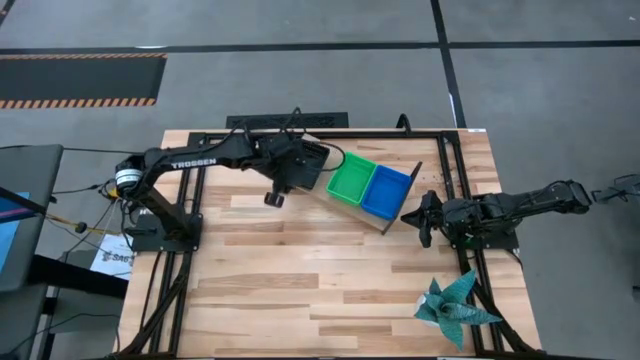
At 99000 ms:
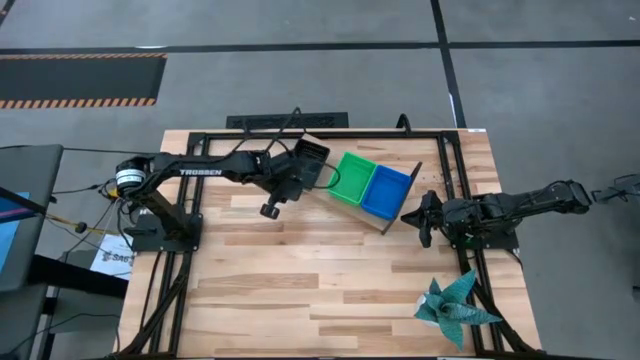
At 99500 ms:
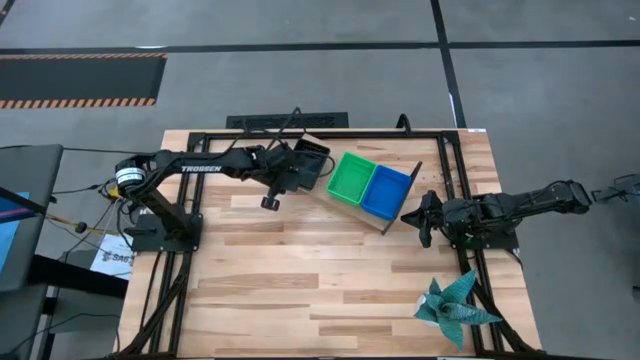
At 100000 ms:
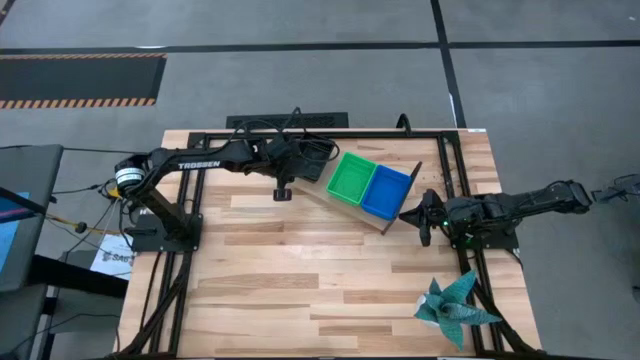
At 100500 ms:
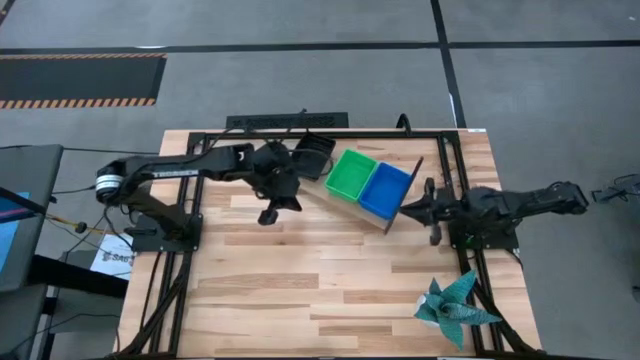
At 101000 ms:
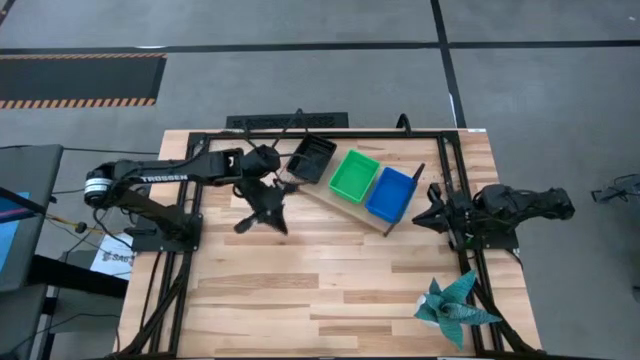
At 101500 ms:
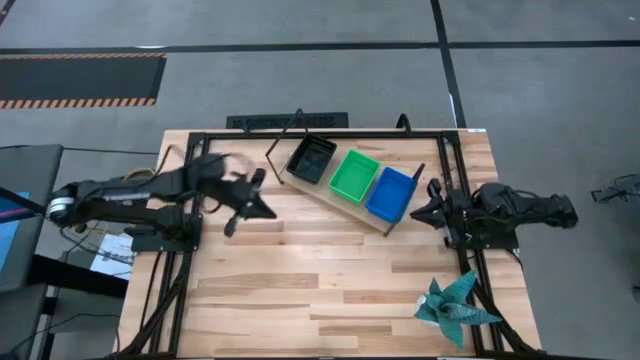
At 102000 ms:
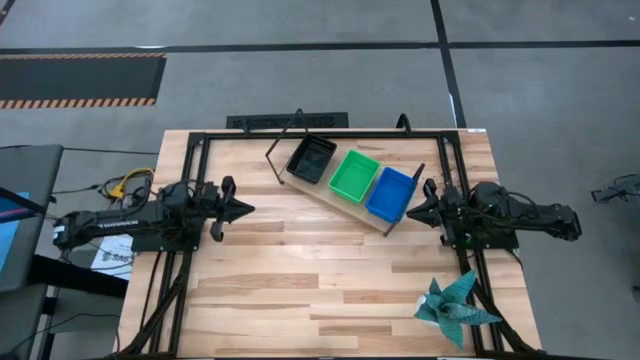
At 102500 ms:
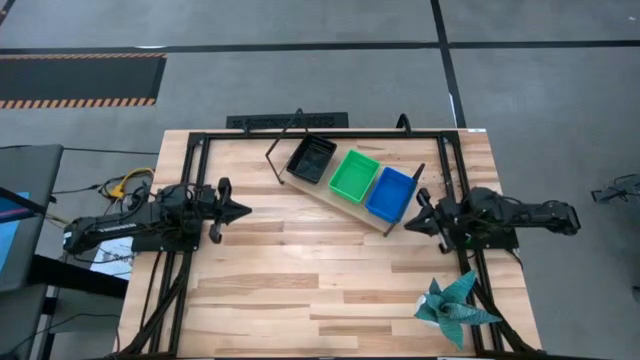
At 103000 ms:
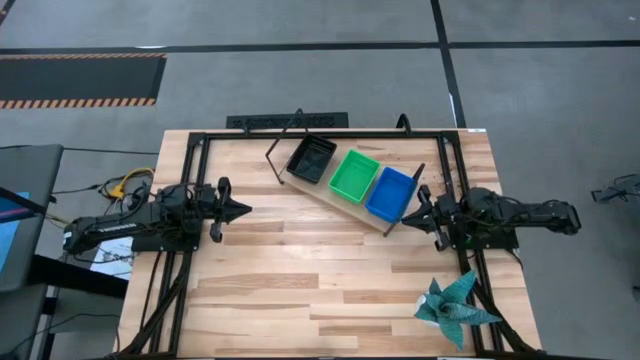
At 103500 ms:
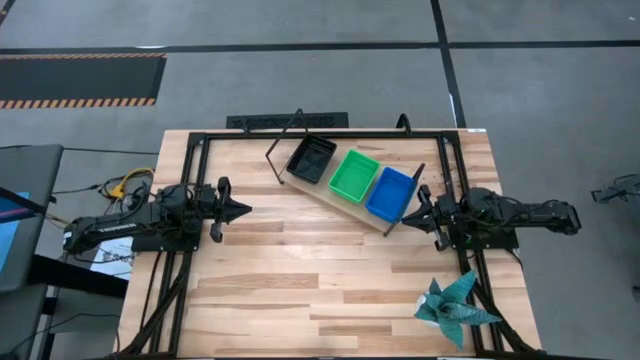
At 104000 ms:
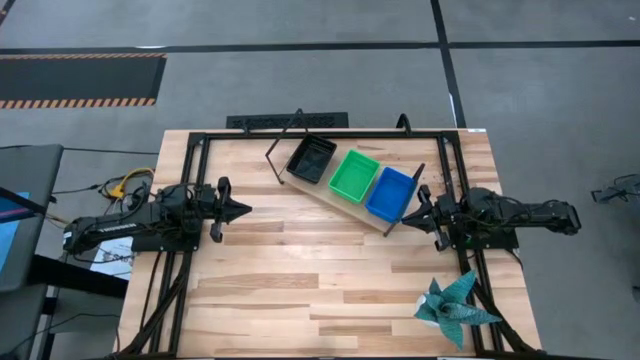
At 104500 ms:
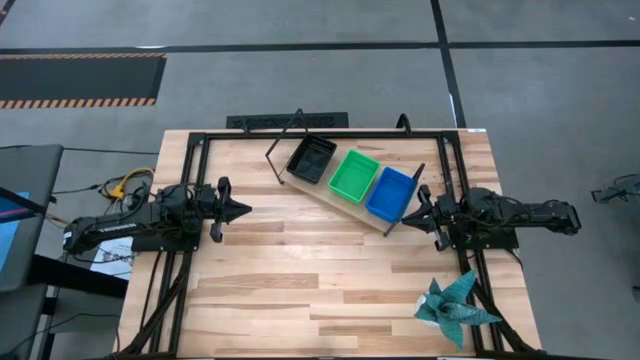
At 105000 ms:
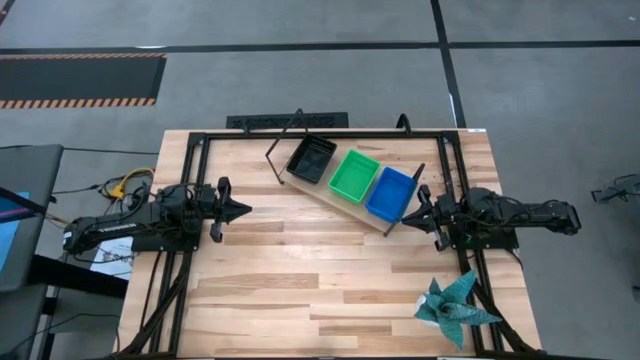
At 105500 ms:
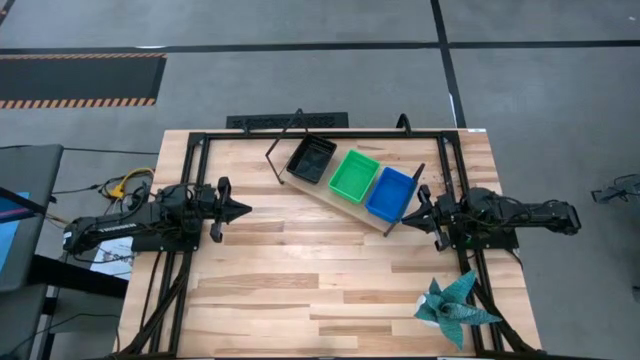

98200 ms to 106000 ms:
Task: Stack baskets on shelf by color
Return to Home Position

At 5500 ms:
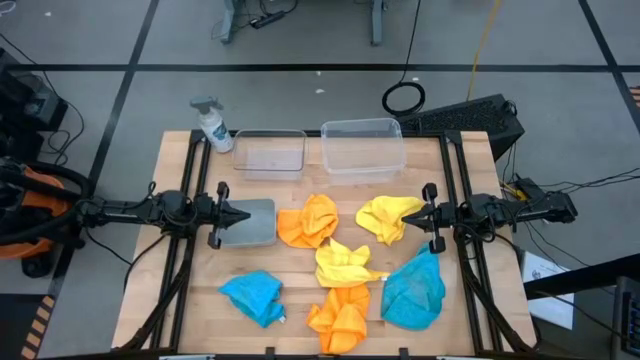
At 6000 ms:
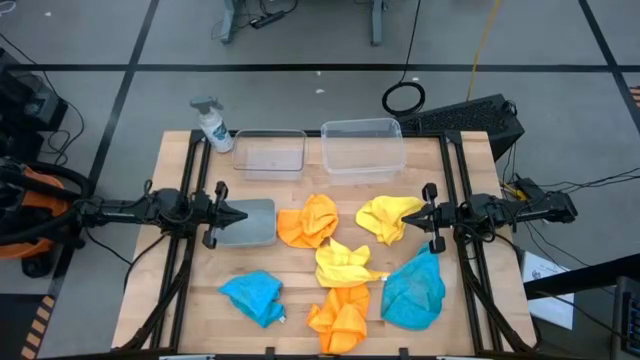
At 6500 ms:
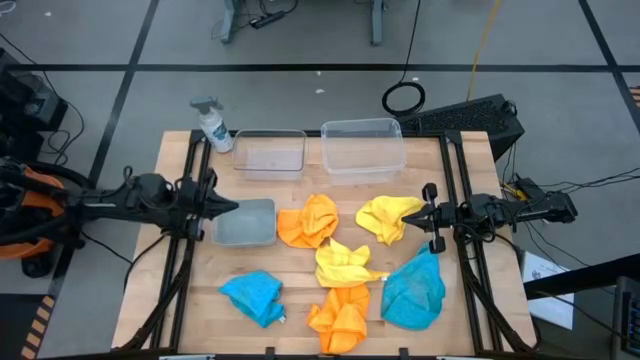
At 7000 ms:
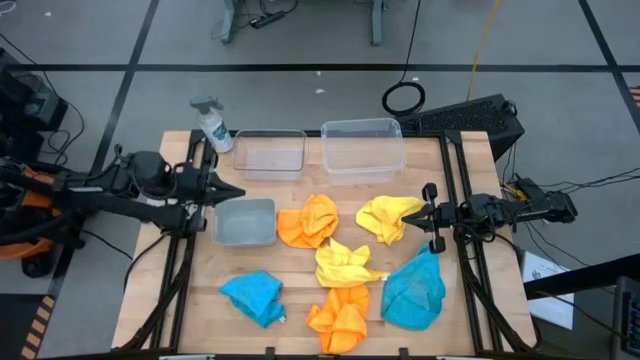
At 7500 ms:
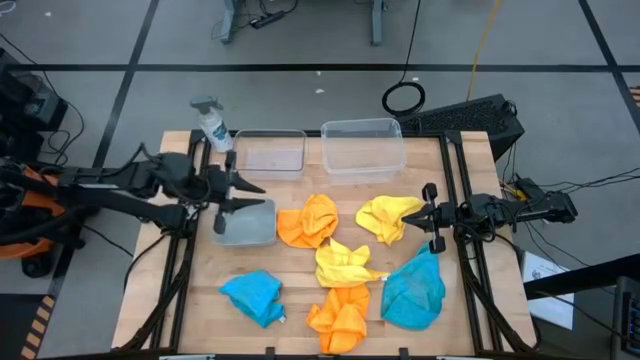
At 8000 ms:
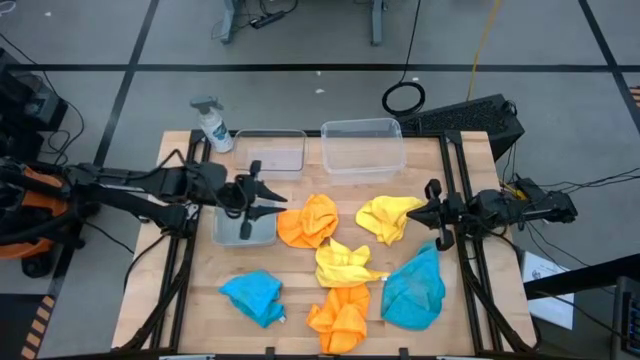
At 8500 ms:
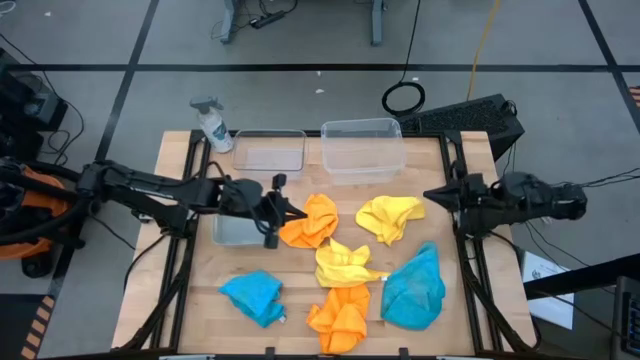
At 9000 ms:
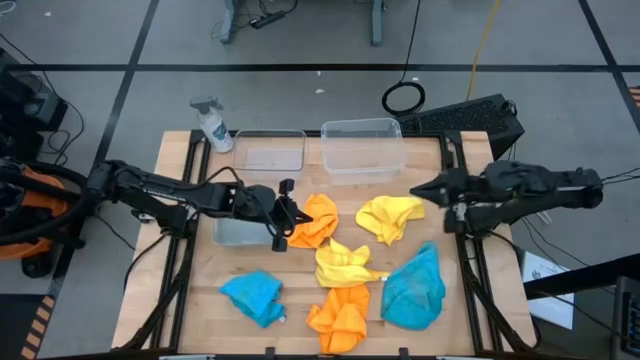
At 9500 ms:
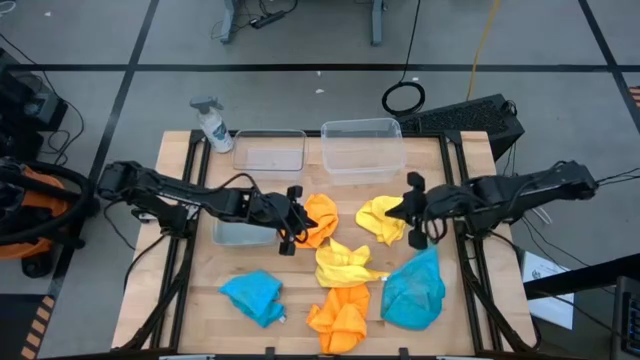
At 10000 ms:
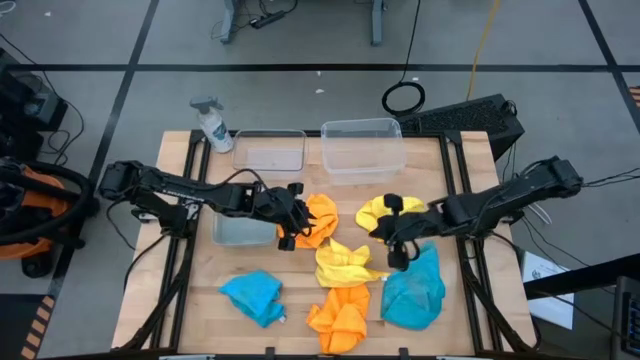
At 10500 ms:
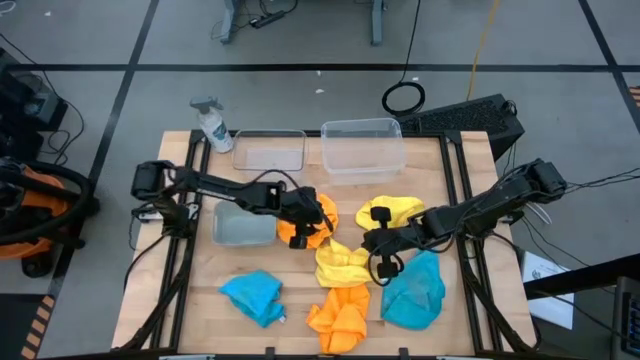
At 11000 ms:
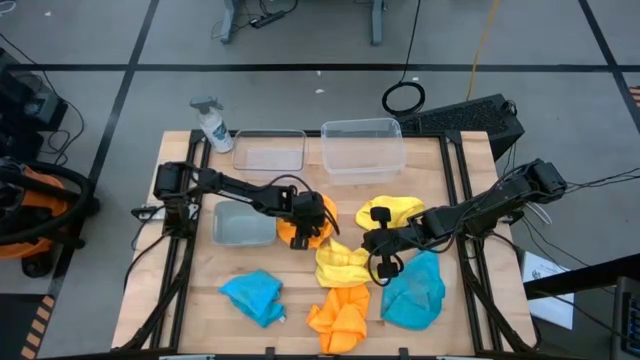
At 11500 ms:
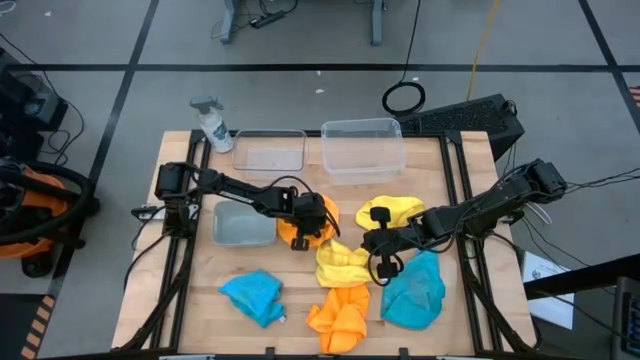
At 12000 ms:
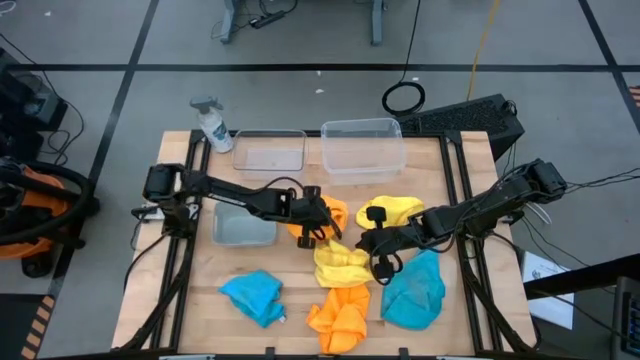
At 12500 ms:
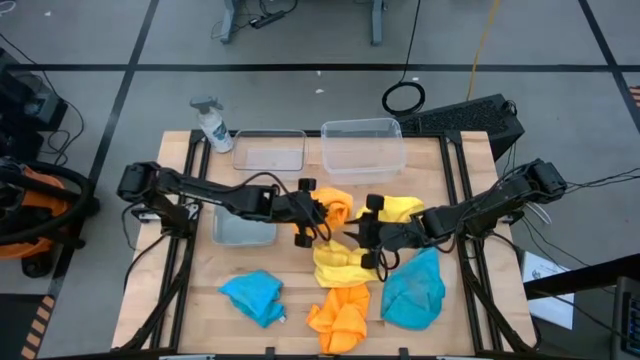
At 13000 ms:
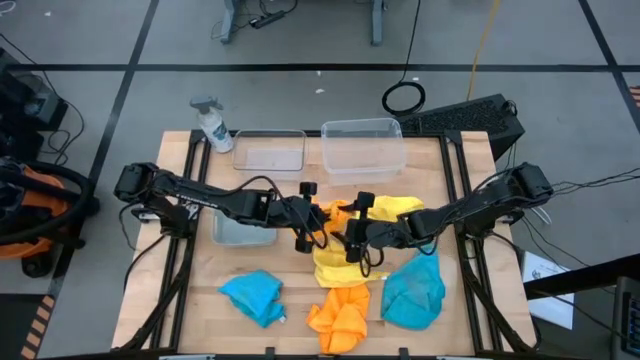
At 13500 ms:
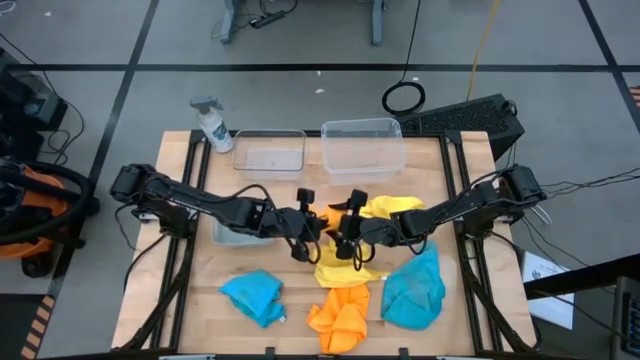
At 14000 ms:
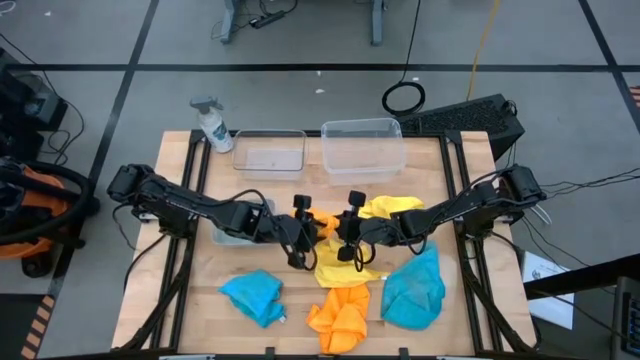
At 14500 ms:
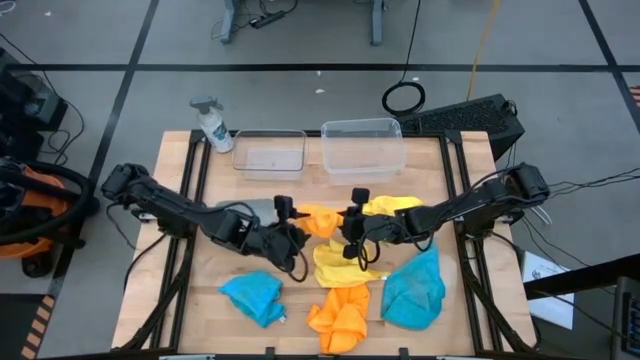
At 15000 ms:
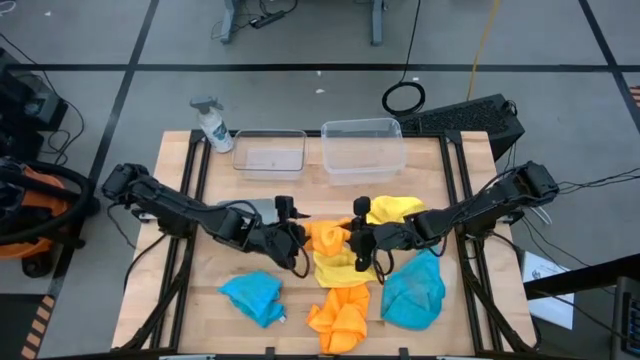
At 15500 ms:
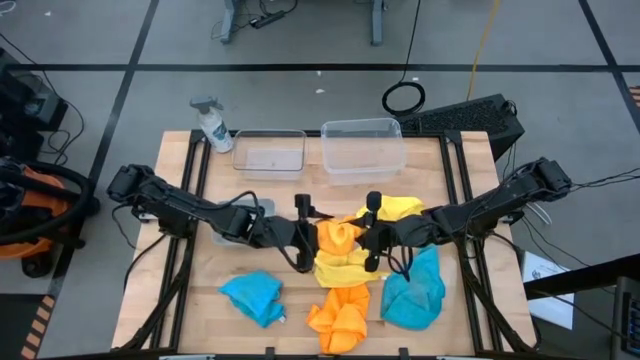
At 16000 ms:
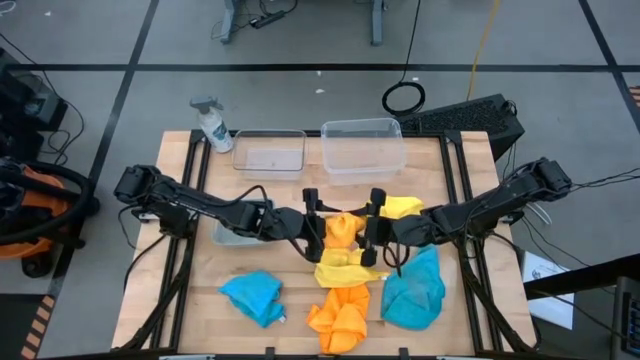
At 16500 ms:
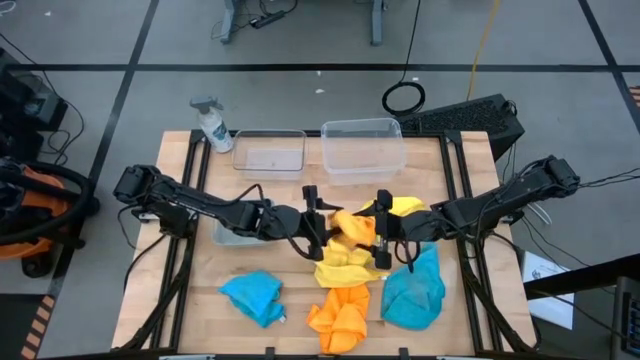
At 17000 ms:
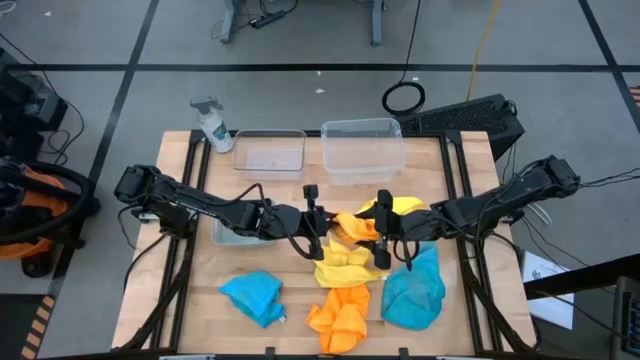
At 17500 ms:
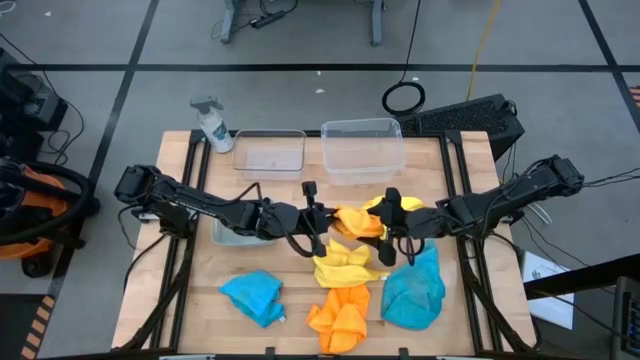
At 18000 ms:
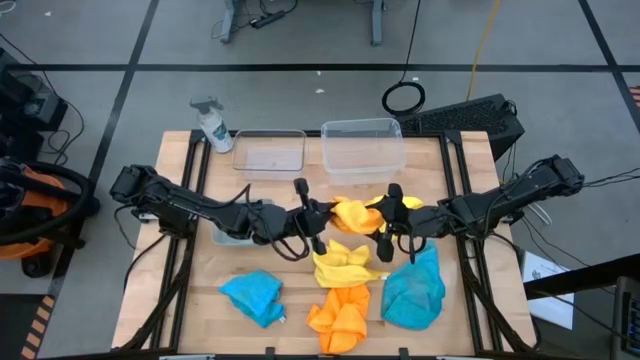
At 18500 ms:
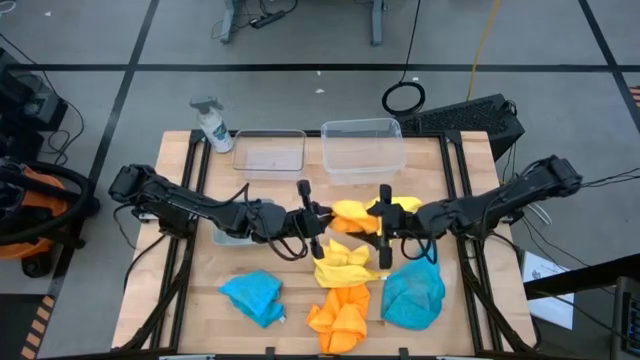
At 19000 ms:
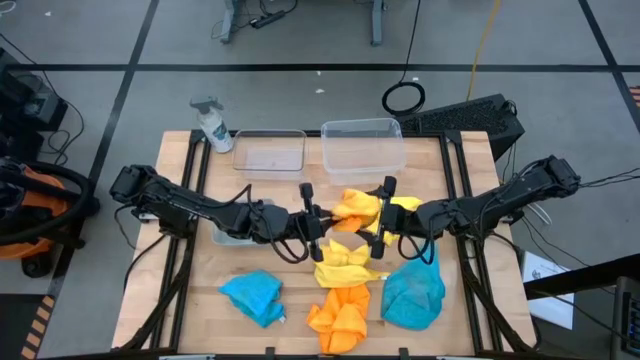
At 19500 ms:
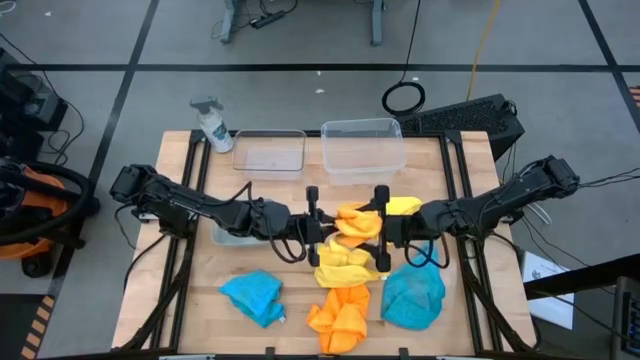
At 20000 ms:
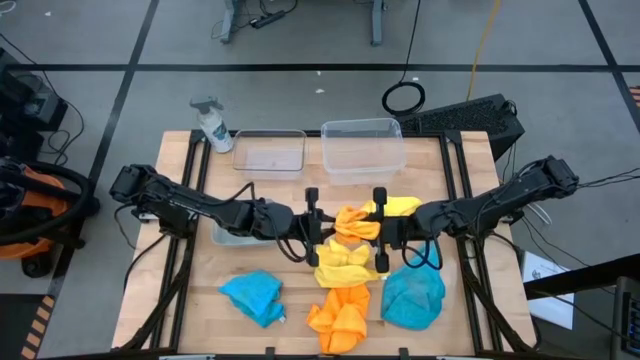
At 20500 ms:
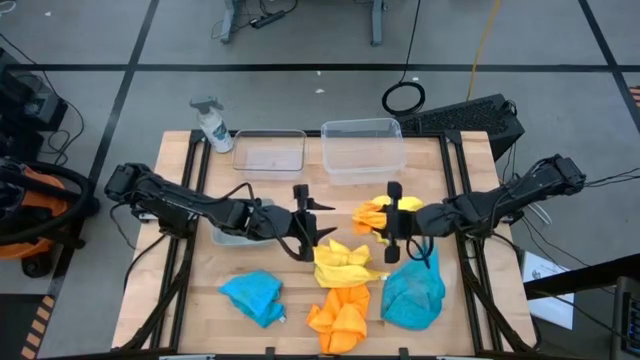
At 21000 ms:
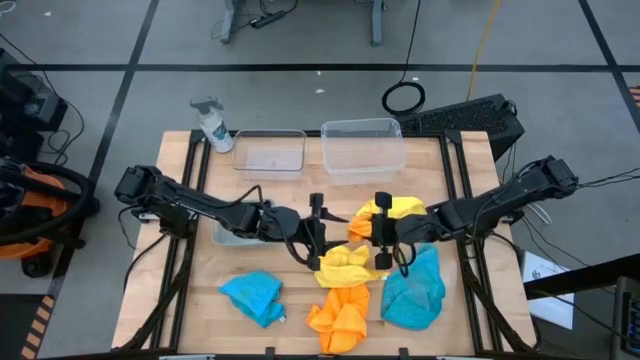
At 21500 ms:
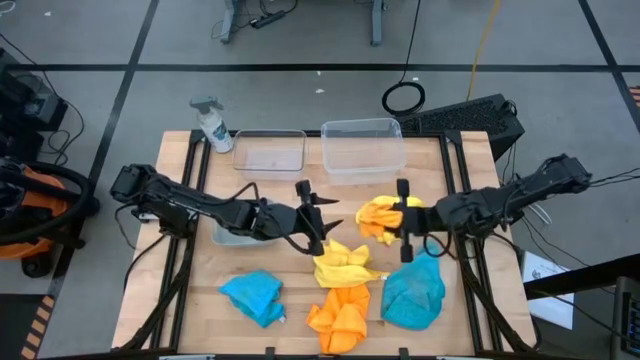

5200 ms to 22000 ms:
Task: Sort microfiber towel by color & place in baskets
Put the top orange towel into the left transparent bin
